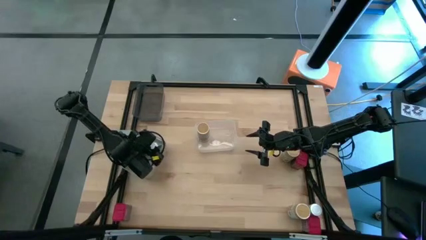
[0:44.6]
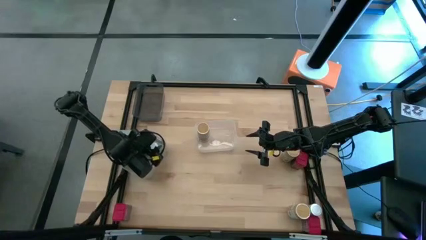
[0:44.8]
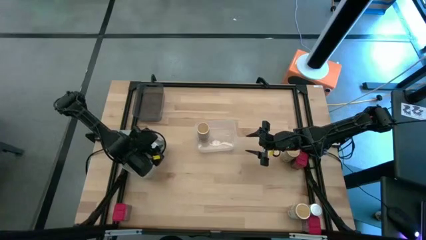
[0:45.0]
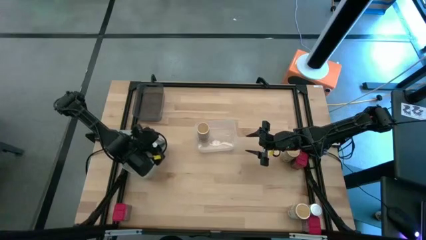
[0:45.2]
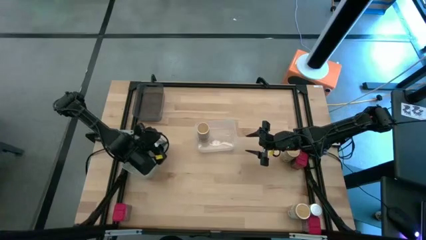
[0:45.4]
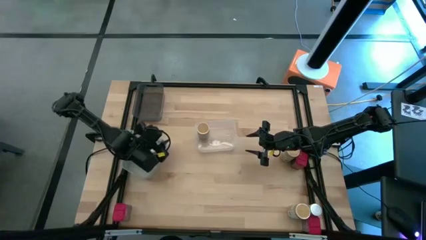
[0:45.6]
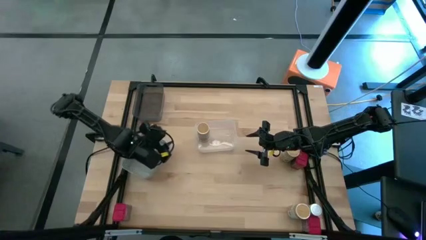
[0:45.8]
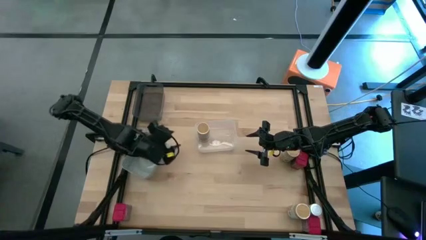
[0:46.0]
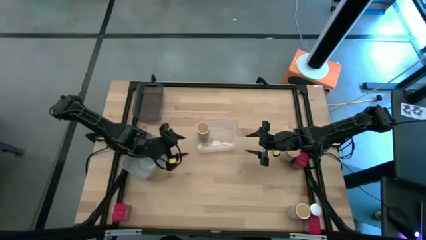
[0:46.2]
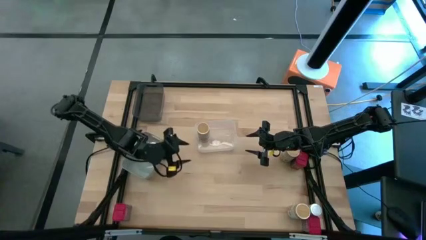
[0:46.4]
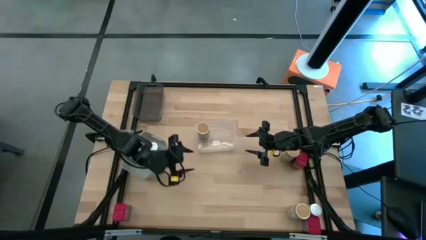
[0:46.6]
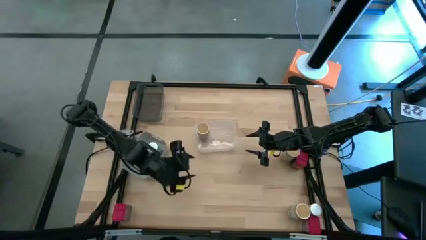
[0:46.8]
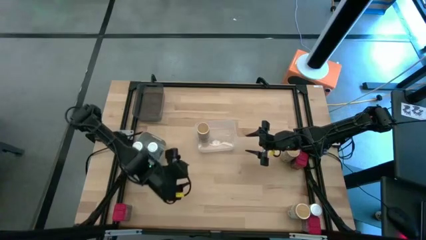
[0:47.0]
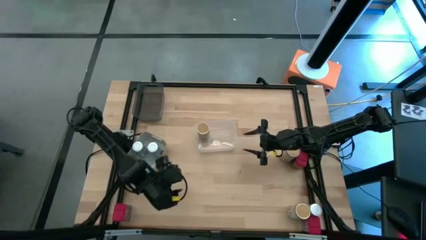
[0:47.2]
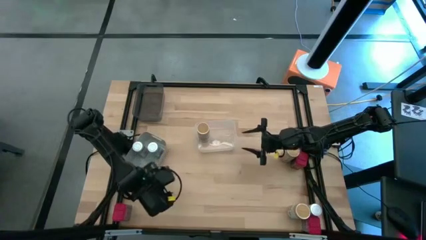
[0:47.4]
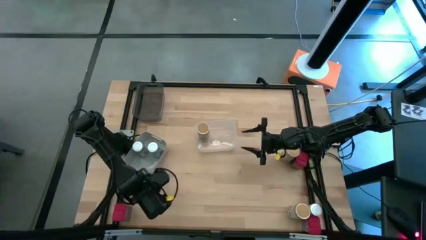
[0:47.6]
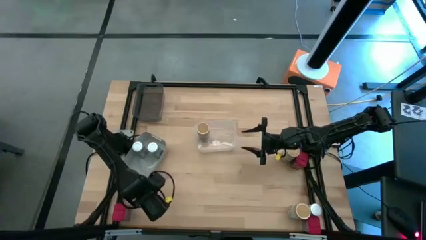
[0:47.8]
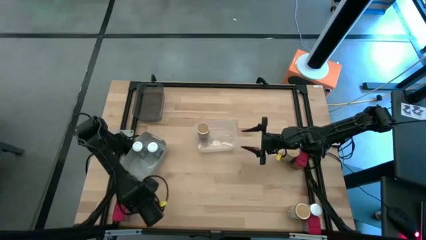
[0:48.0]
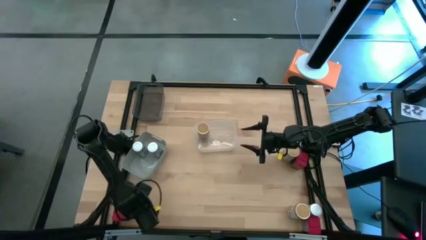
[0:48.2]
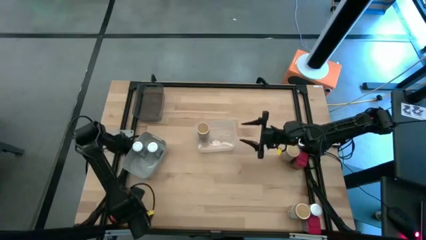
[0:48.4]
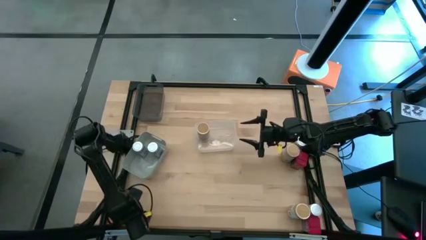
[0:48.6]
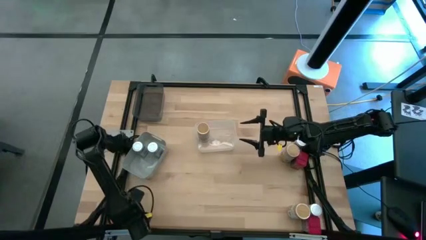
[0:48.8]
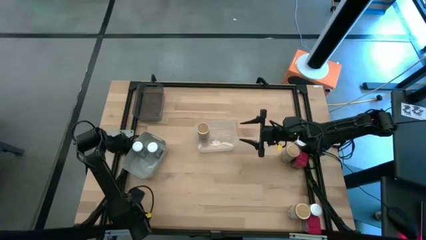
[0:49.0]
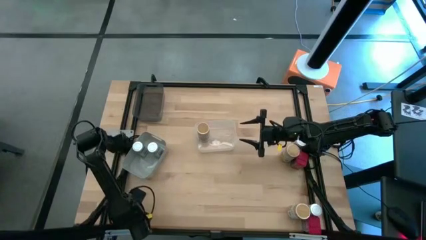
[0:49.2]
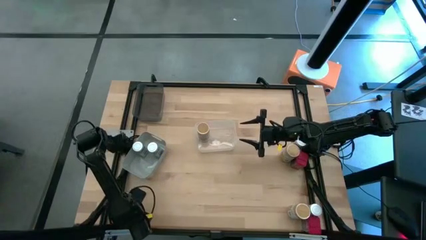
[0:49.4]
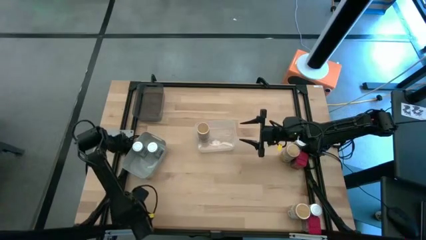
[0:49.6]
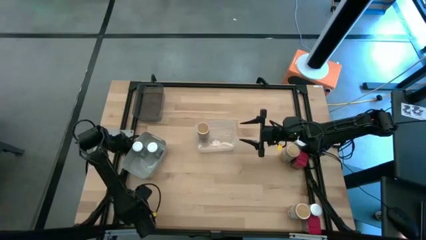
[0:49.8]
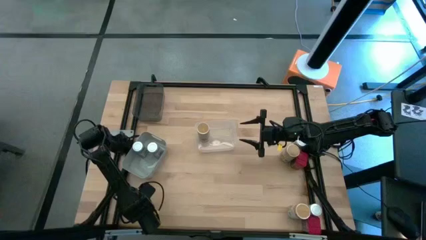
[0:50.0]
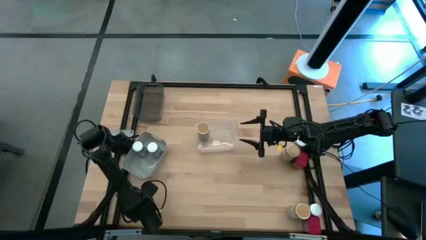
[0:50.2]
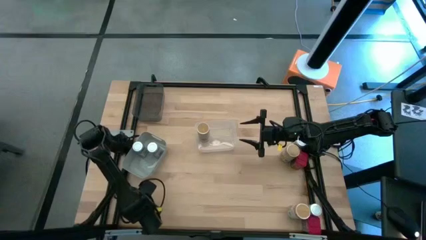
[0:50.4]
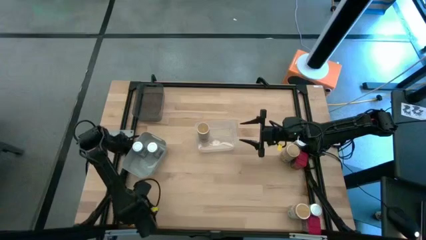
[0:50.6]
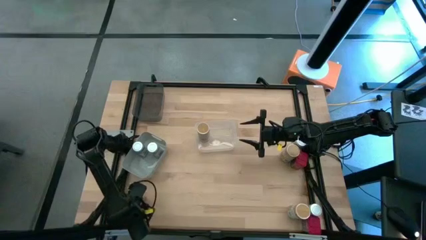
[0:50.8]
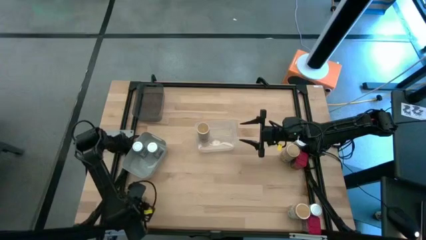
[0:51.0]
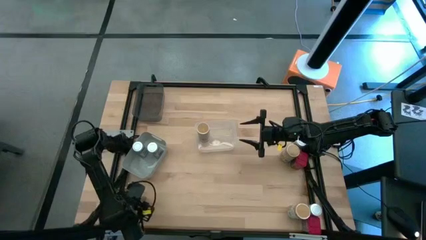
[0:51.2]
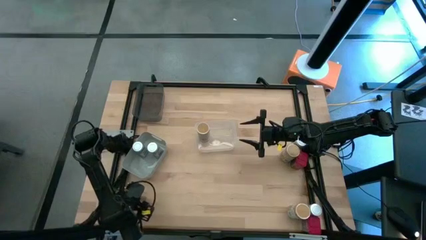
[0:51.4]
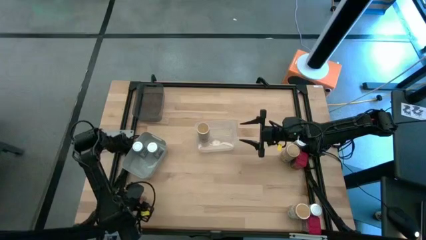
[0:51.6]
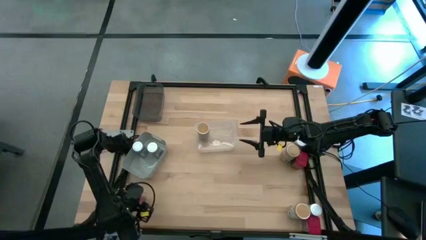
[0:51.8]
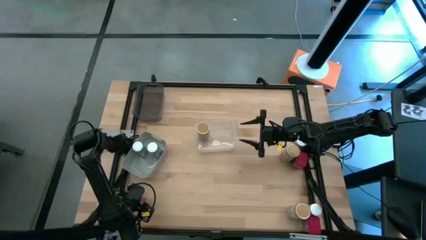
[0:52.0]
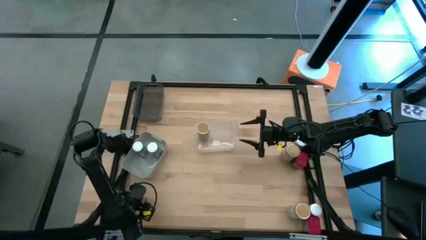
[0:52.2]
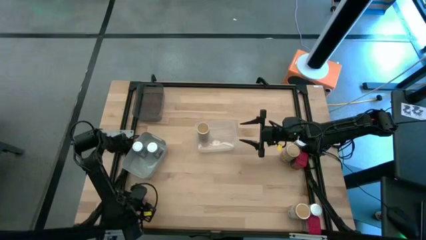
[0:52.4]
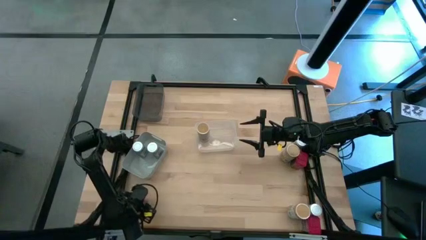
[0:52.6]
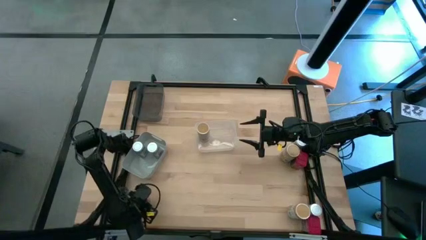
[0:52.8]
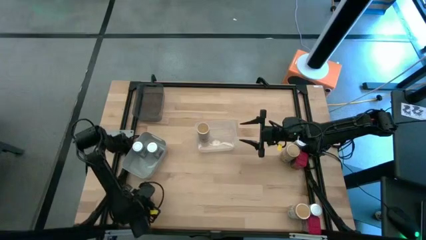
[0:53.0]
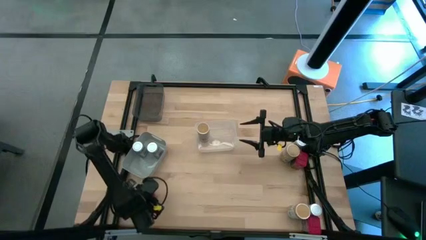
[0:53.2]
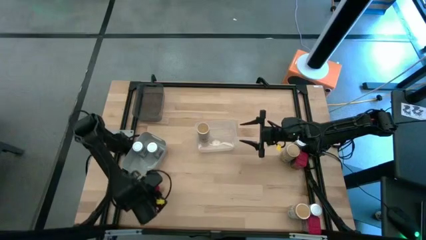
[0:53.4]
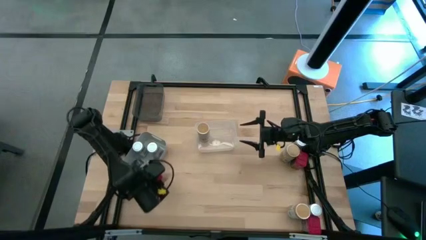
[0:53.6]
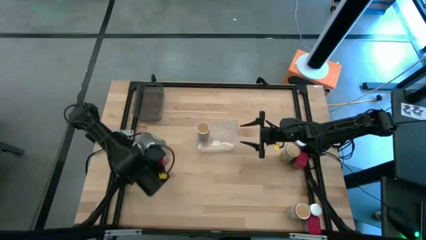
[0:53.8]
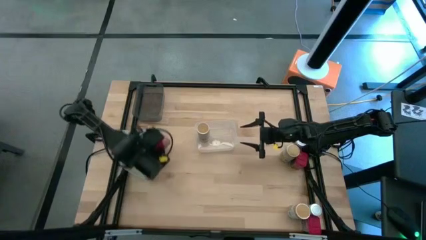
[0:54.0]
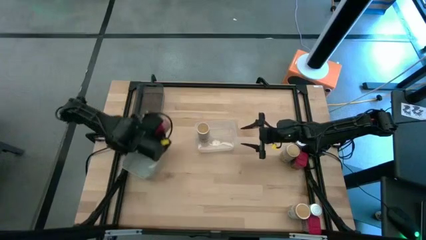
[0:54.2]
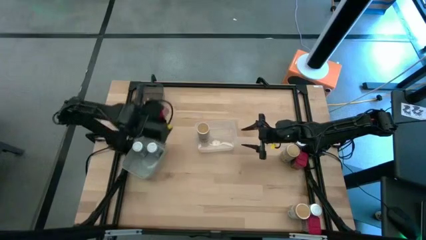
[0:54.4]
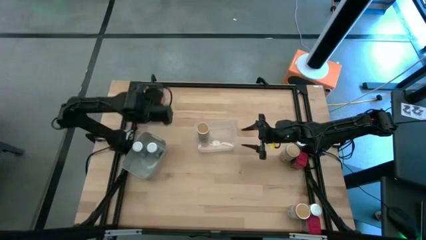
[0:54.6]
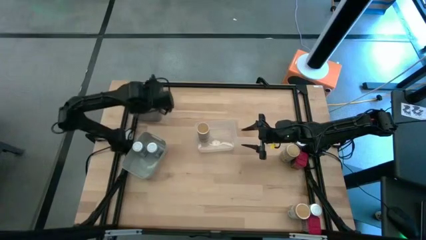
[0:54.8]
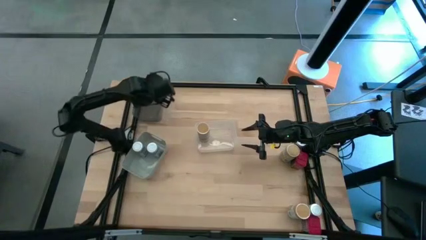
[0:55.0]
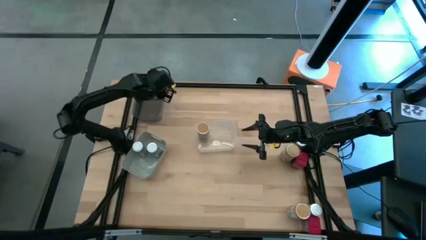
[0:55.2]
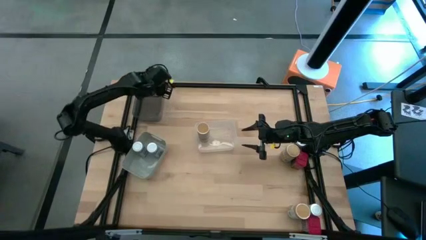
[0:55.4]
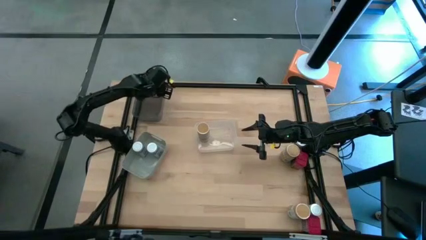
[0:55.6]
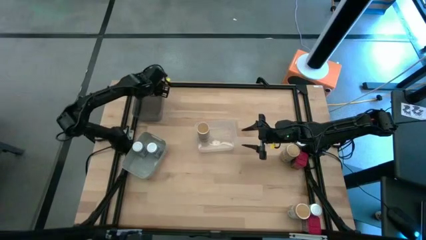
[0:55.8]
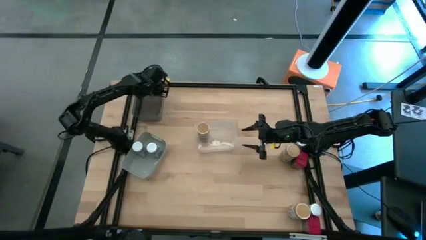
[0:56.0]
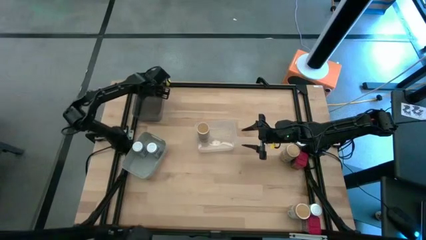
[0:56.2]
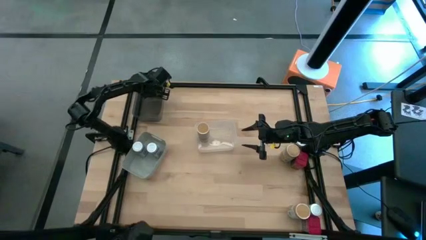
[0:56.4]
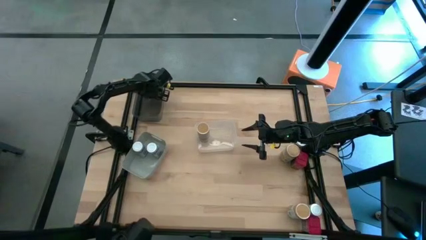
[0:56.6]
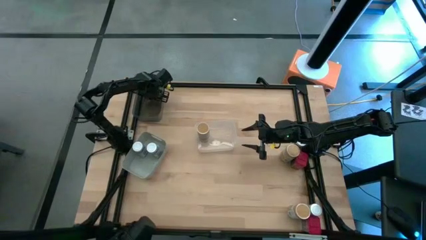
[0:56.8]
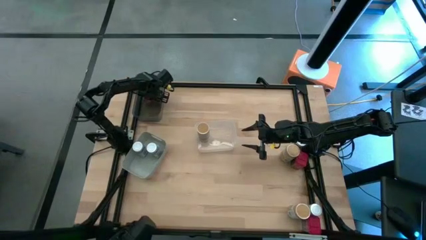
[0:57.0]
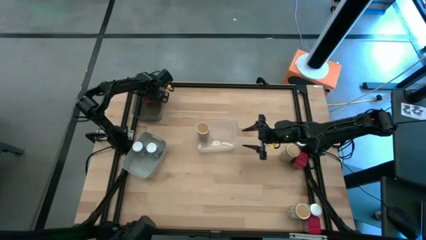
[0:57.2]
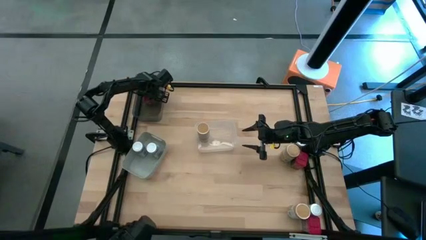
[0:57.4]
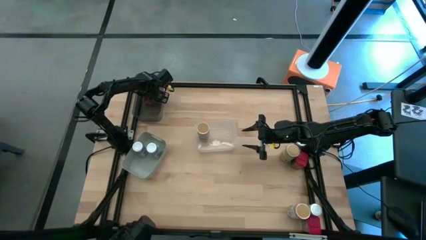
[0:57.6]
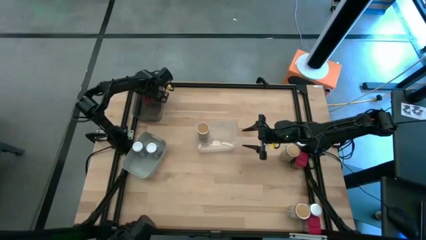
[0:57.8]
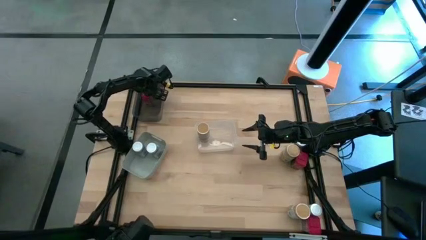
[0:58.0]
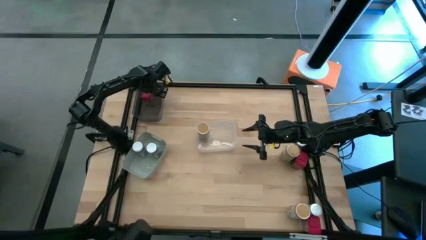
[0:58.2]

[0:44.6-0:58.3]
Task: Sort spices by type
Put the bottom left red seasoning can into the black bin

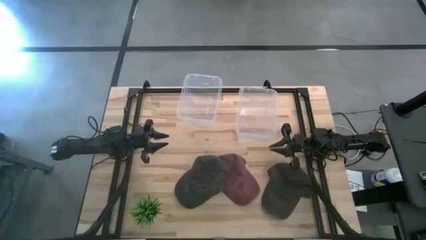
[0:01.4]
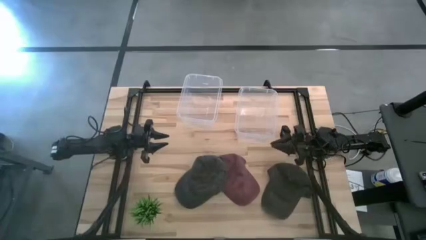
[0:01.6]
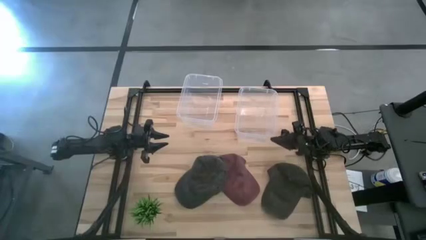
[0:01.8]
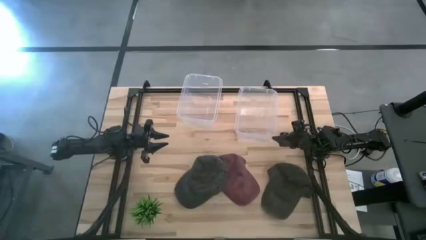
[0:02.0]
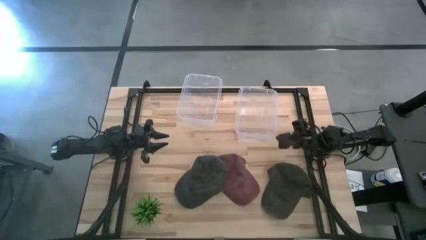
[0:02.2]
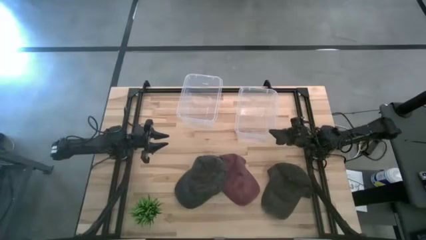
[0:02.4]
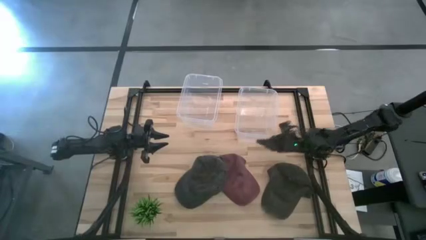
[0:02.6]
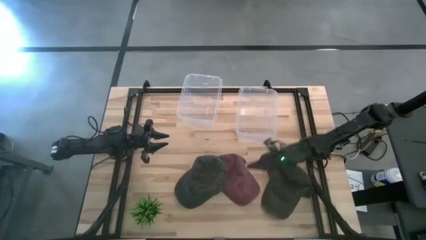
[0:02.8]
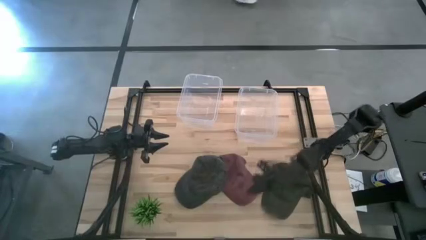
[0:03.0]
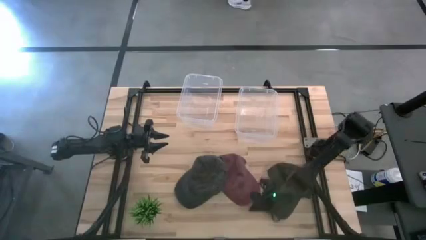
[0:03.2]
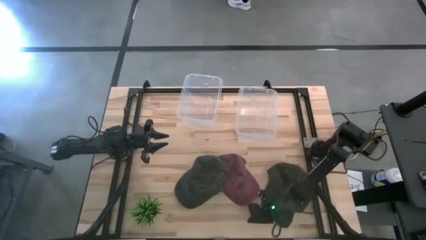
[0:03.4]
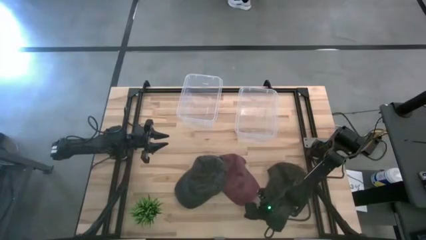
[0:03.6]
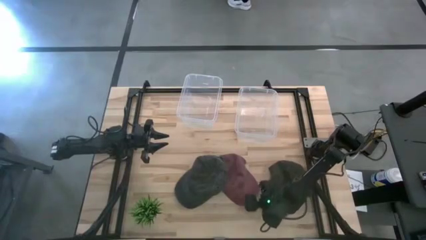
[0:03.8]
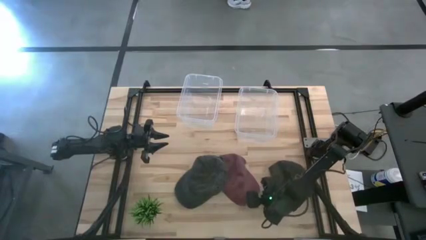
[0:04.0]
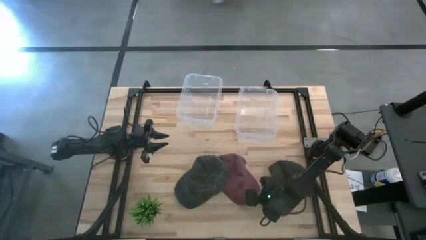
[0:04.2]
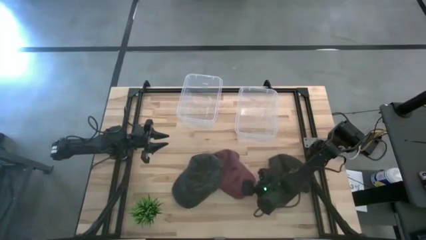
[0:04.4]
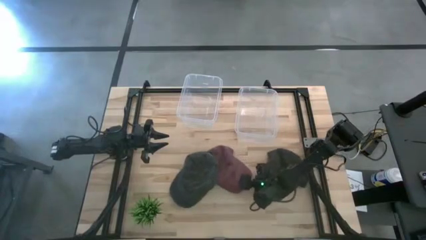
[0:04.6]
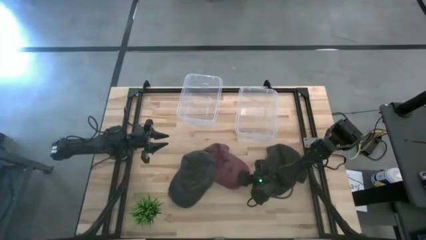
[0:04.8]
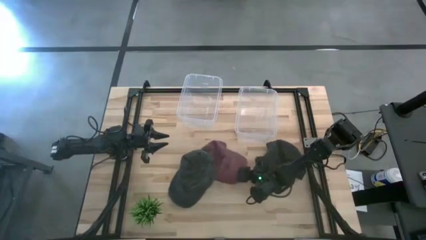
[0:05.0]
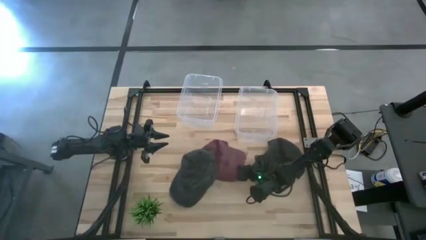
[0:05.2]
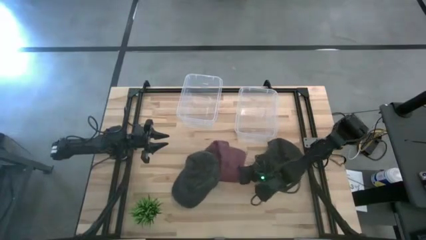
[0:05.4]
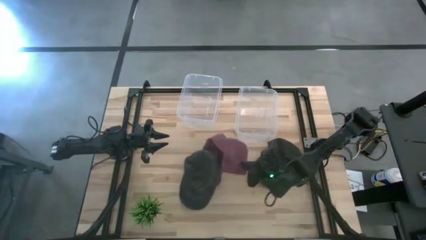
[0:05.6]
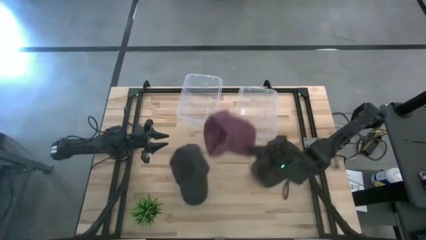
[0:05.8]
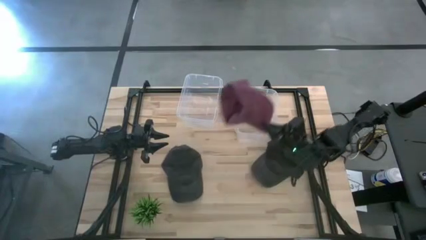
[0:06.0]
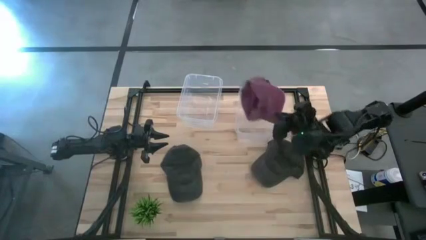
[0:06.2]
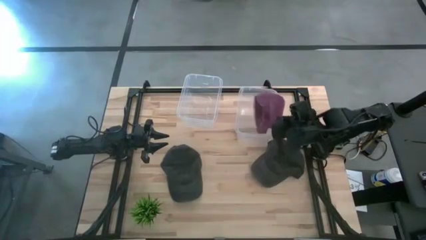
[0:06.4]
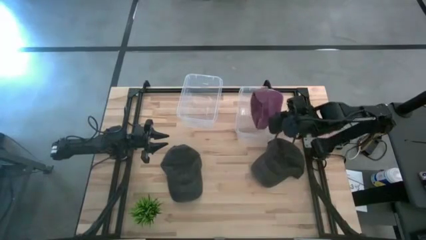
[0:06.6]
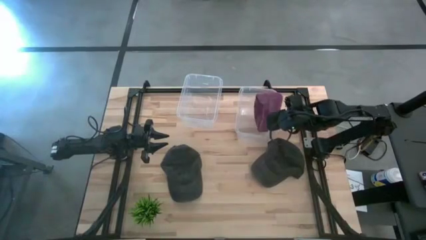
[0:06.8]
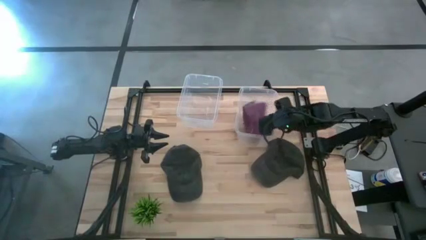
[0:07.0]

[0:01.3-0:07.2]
Task: Pick & Place hat
Put the red cap into the right transparent bin
